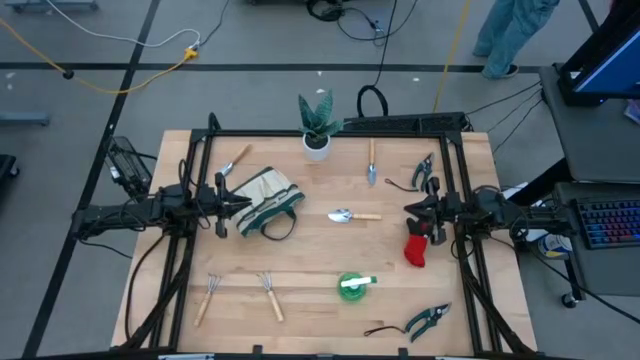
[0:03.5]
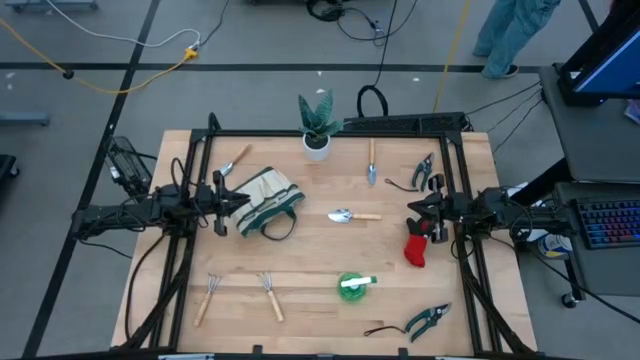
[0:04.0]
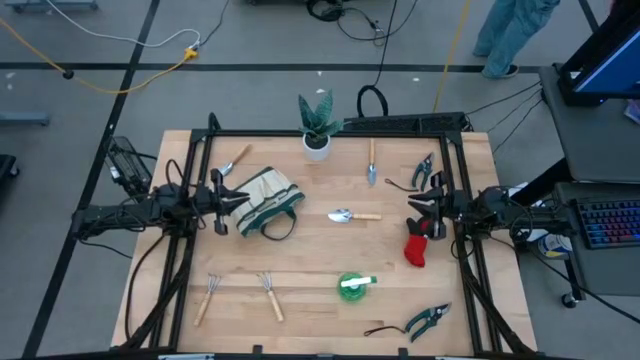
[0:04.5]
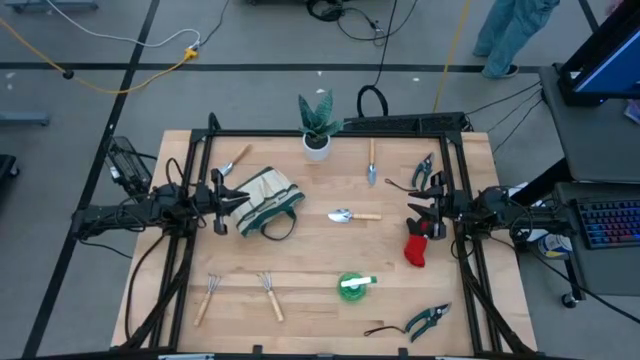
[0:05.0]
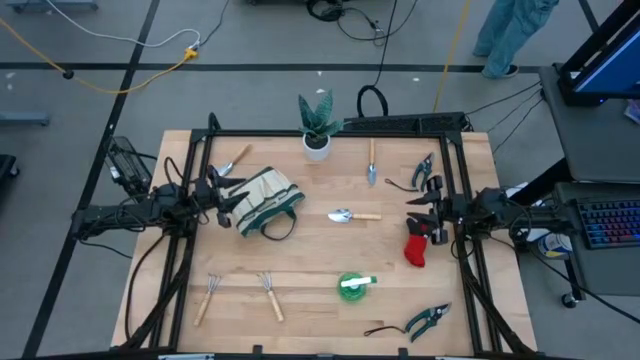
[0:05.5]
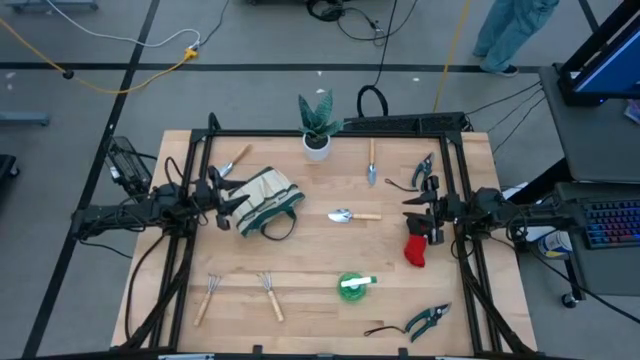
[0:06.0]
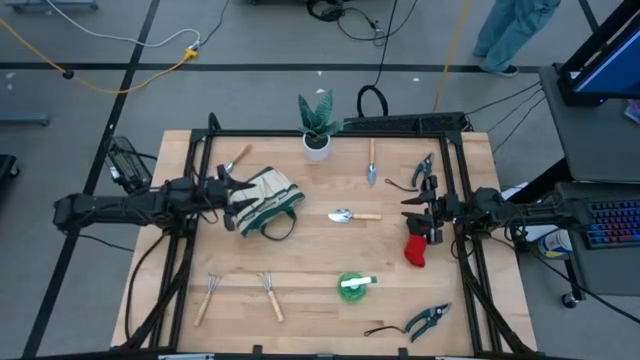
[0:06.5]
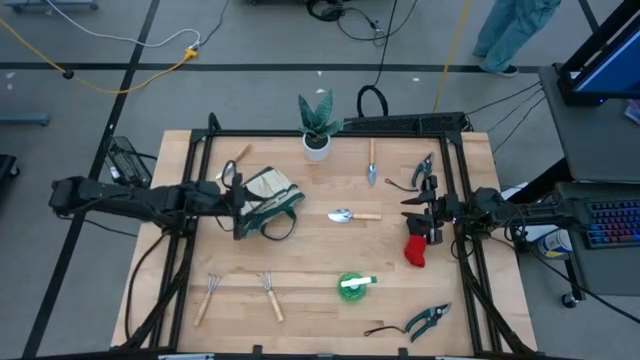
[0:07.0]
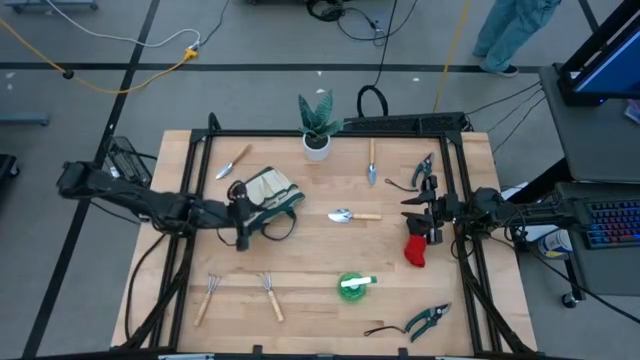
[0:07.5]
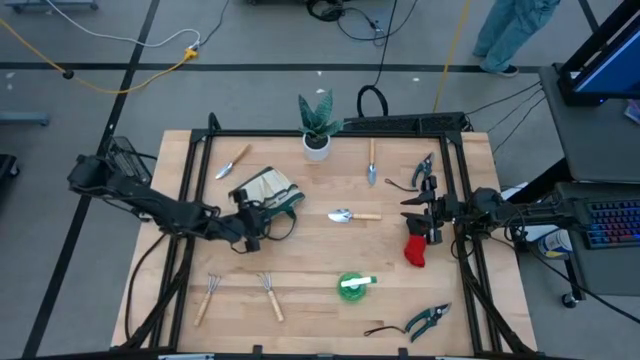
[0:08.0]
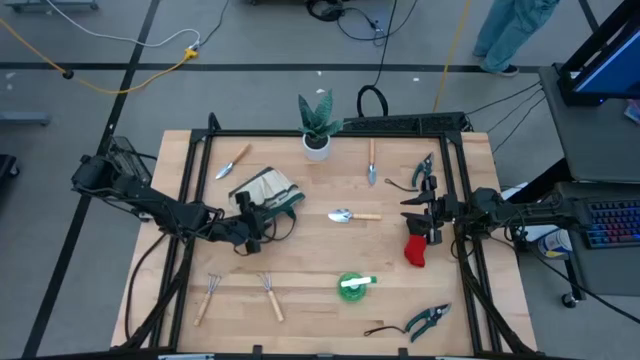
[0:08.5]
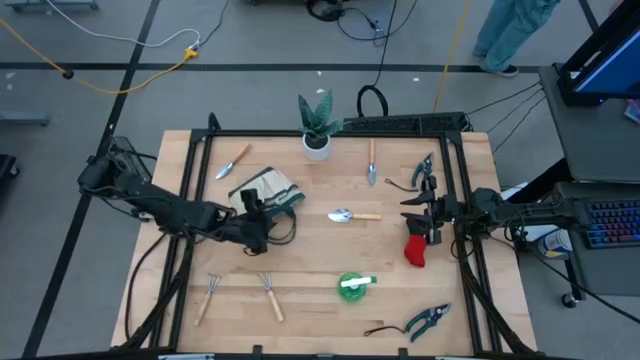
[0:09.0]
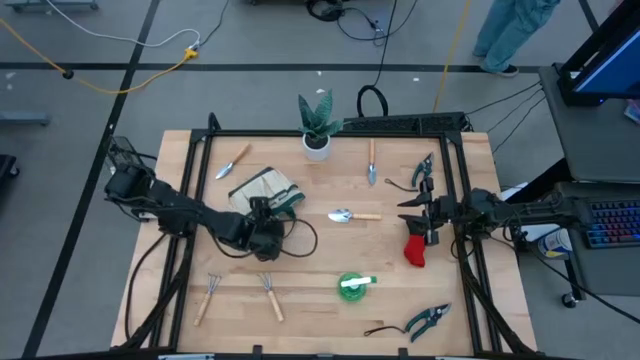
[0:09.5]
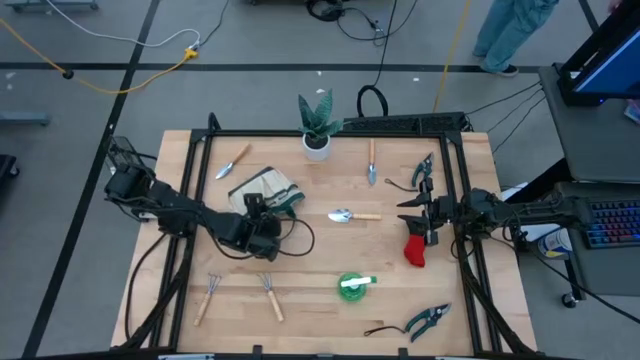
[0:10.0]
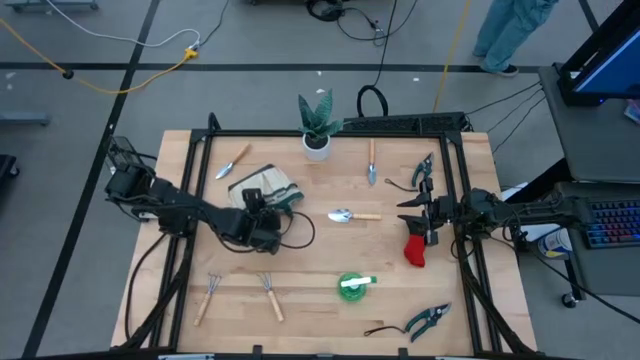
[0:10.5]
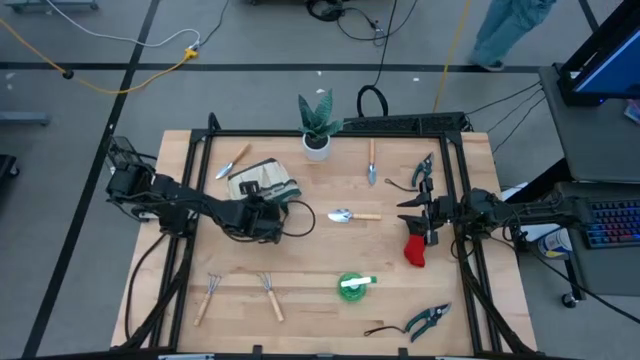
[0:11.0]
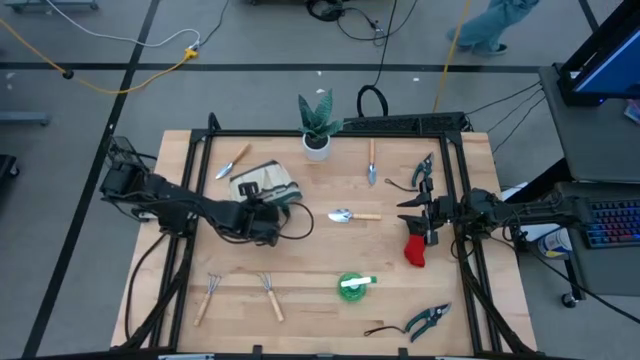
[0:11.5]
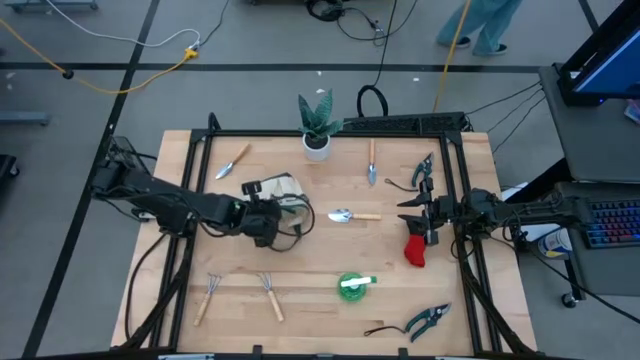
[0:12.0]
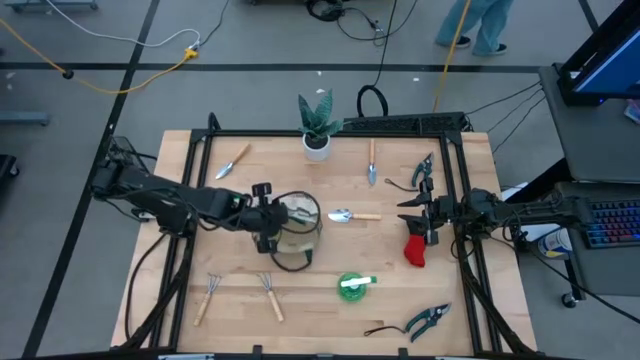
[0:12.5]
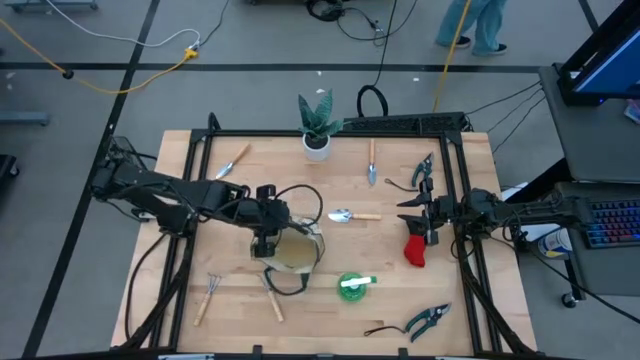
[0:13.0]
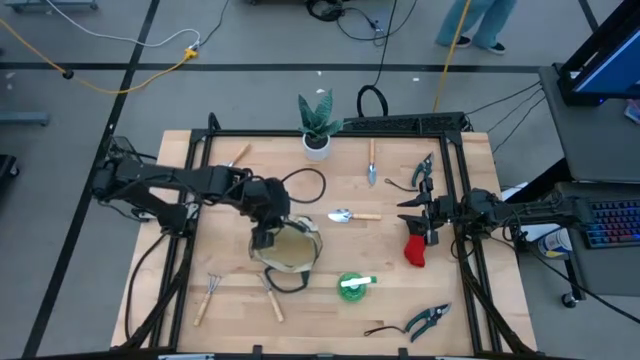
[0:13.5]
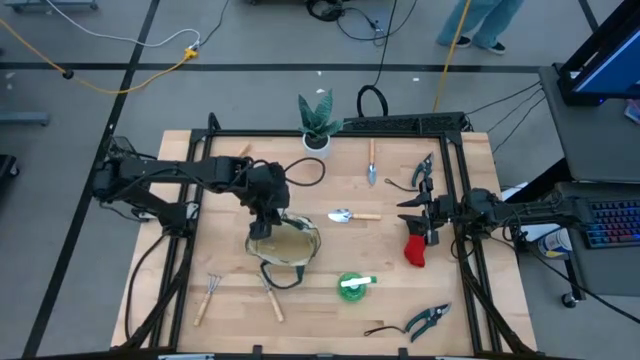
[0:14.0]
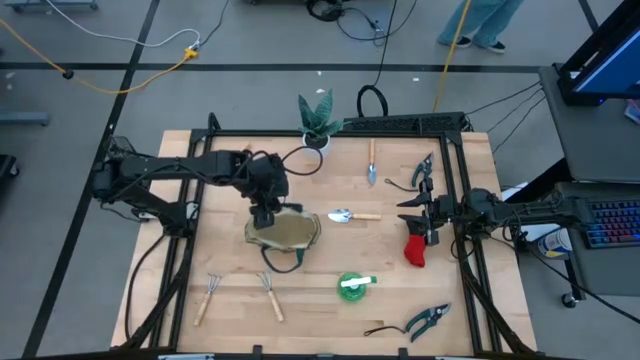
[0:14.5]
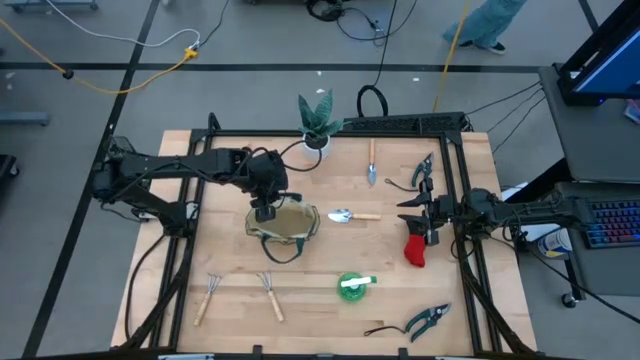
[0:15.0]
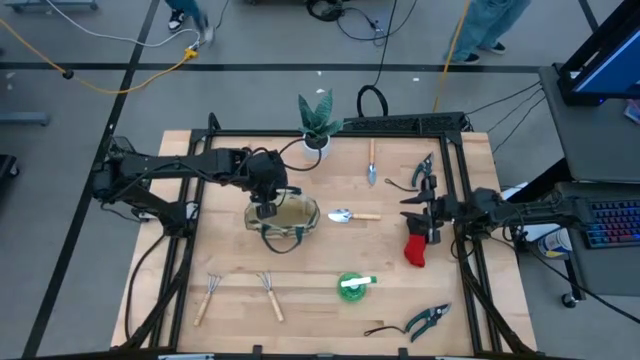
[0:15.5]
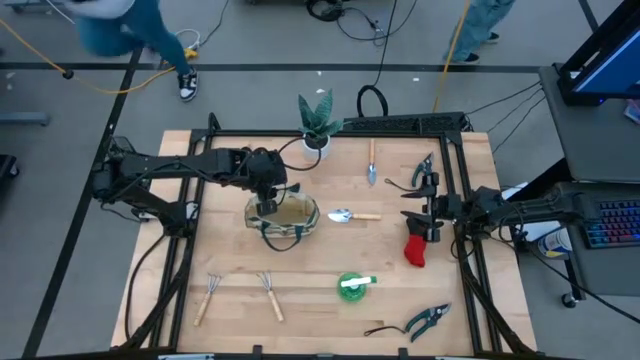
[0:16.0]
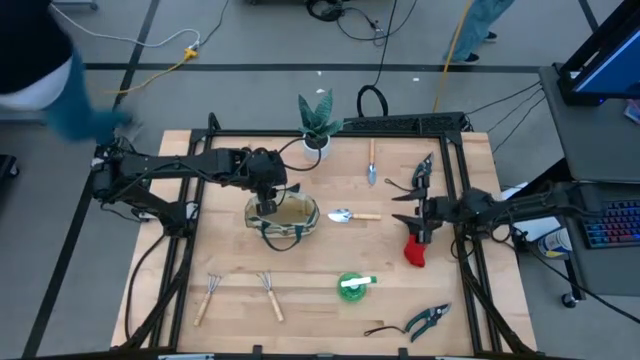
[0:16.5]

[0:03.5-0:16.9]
Task: Pick & Place Garden tools in Gardening bag
Prepare the white gardening bag

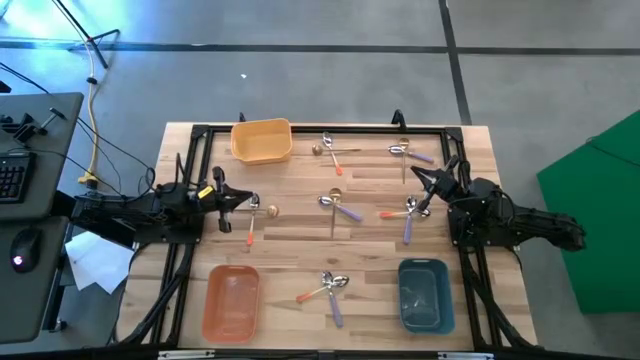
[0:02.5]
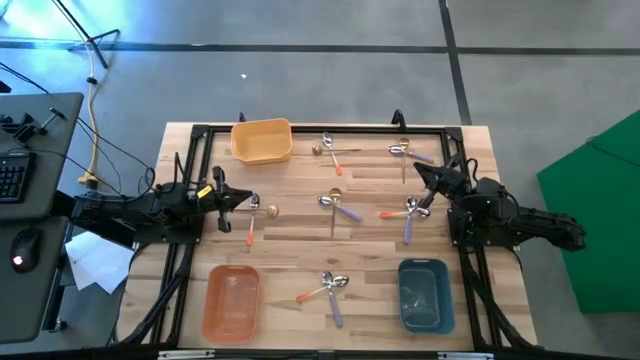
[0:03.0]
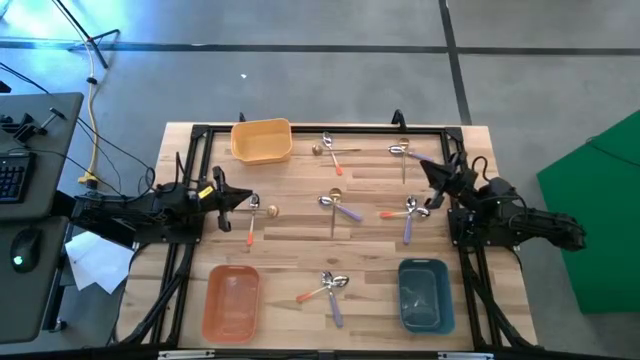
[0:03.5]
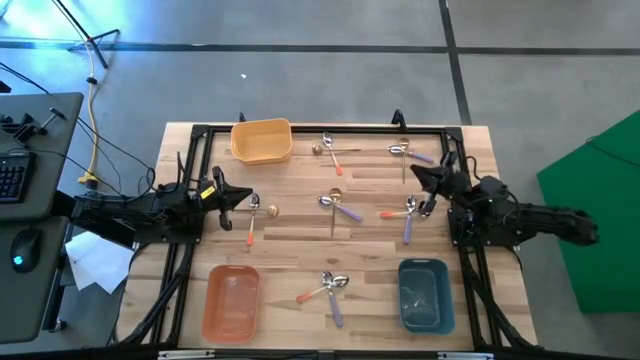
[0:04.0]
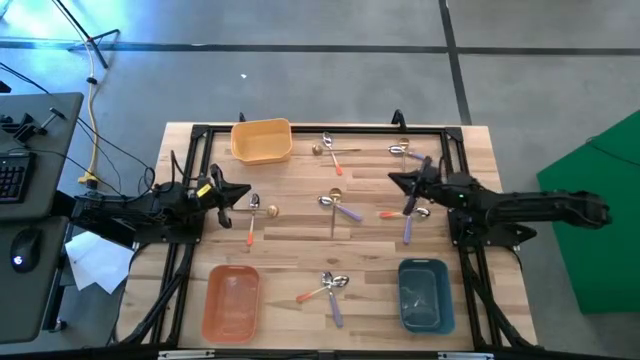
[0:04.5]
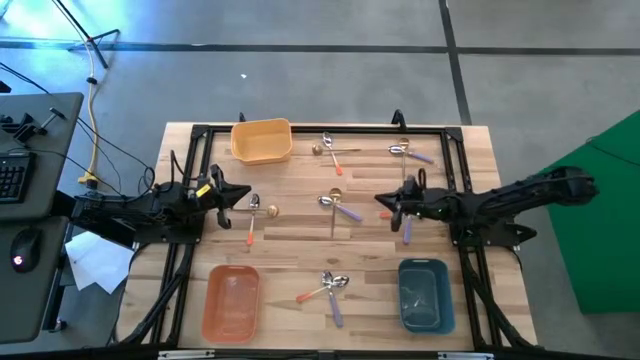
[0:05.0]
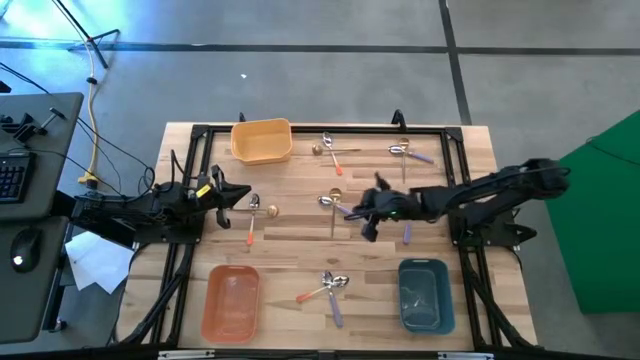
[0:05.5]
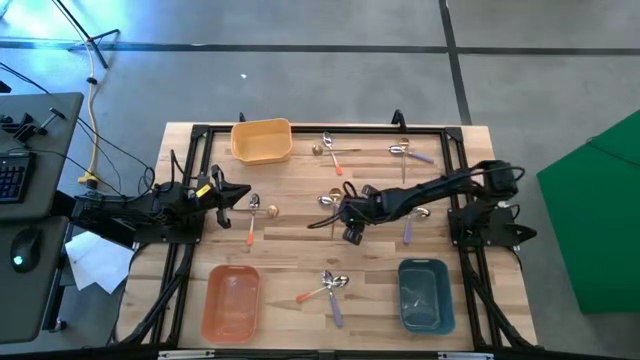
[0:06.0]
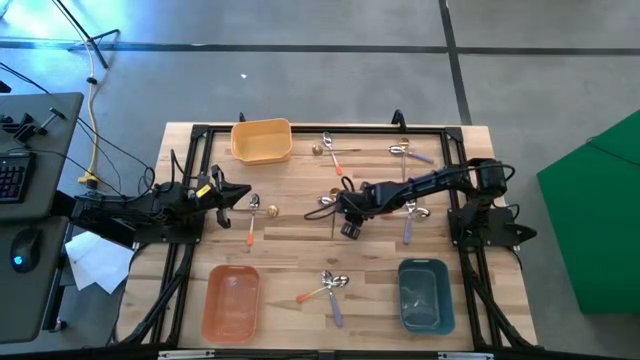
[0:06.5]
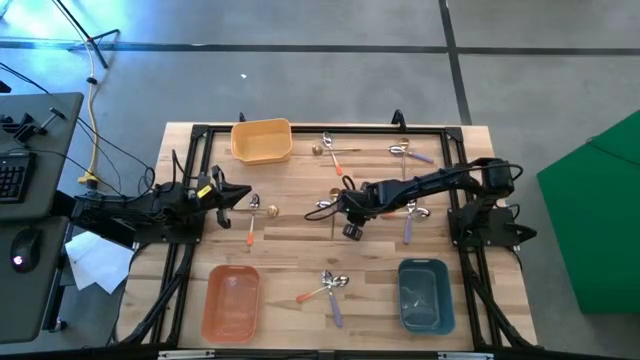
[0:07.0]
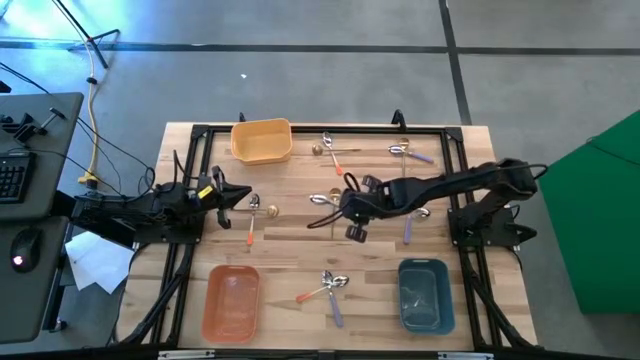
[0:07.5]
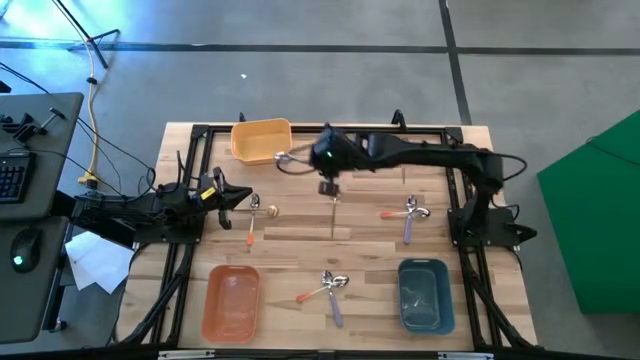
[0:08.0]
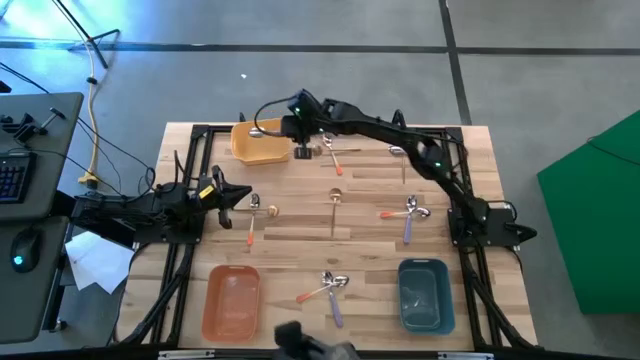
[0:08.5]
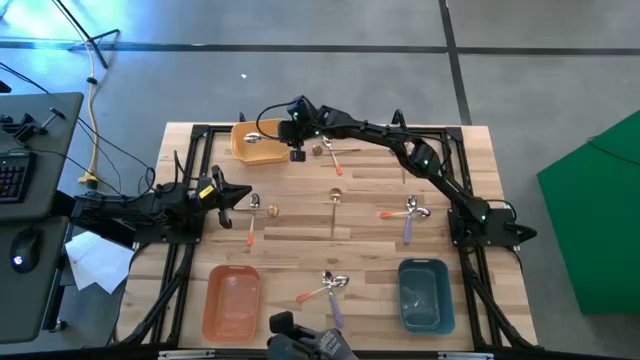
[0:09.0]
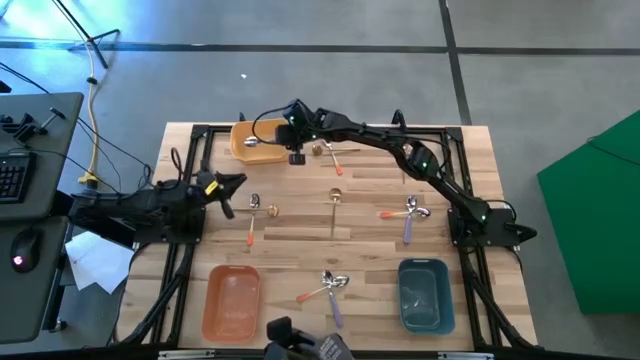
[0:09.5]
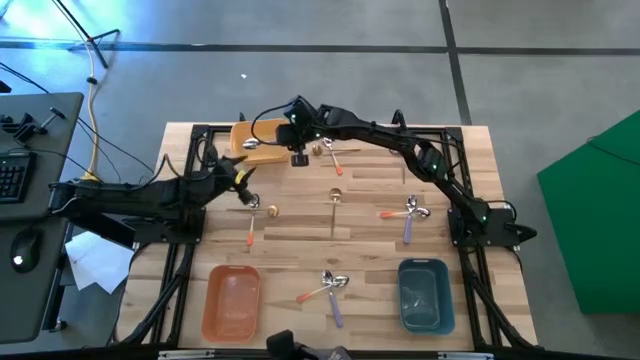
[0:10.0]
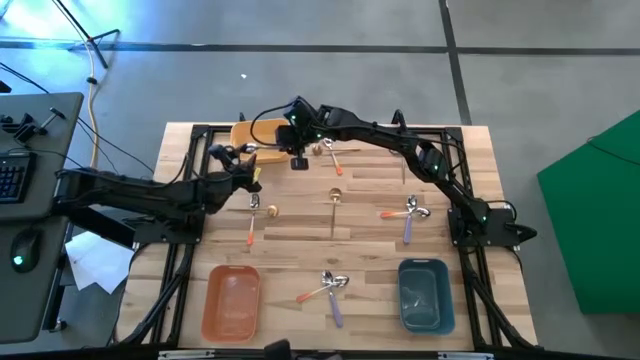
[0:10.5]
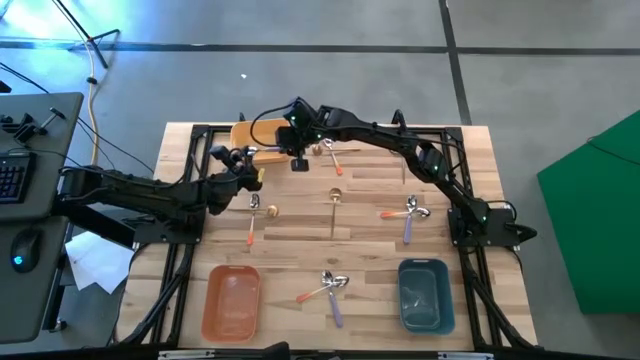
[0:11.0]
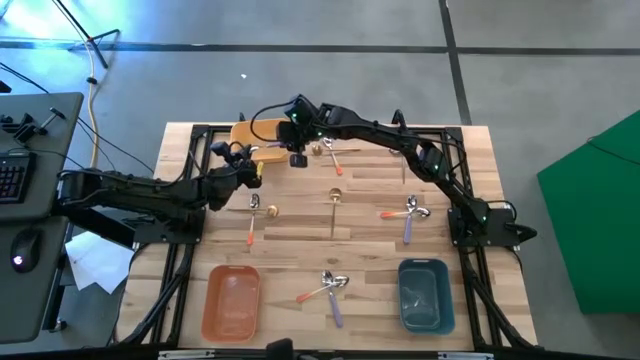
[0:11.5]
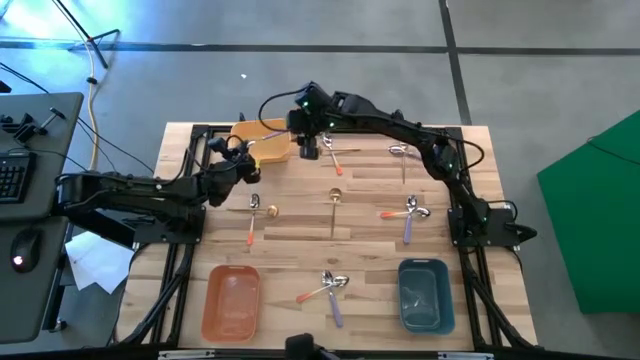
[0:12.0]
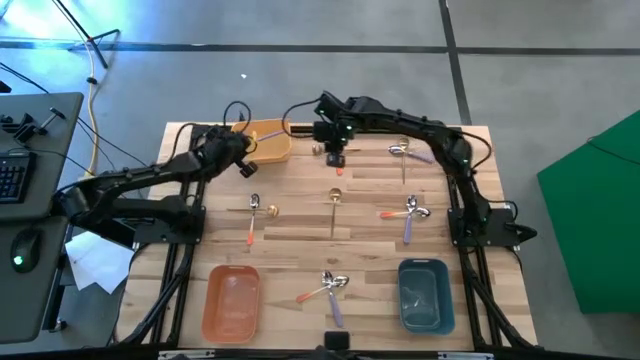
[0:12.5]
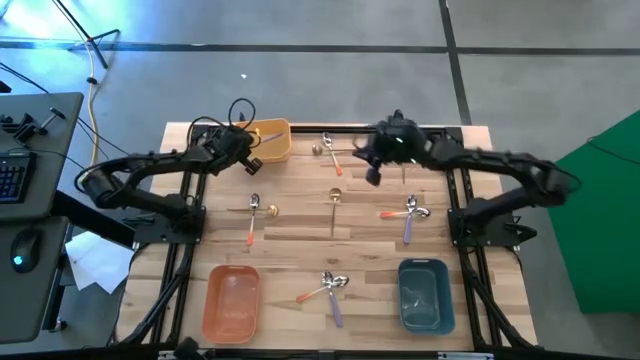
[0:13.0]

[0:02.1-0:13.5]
Task: Sort silverware by color (type)
Put the purple spoon into the yellow bin
